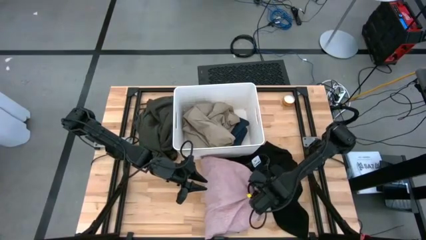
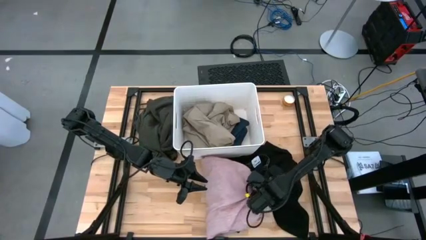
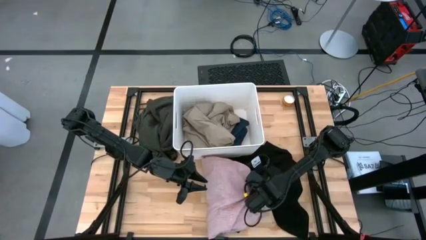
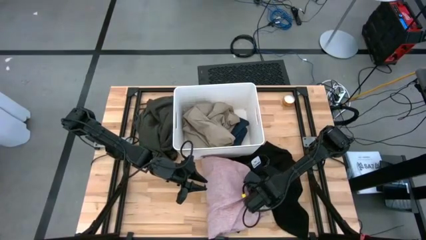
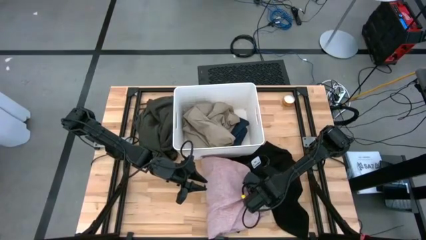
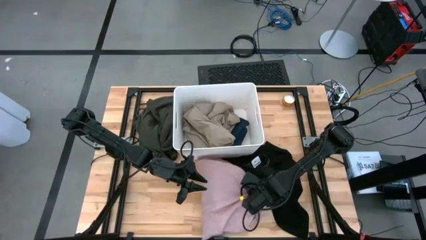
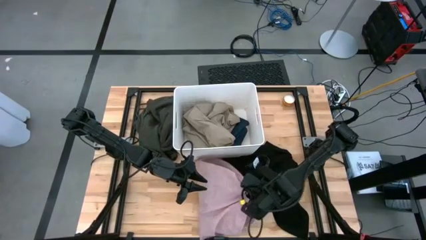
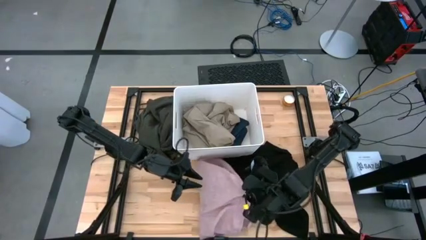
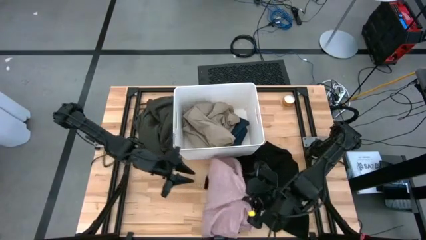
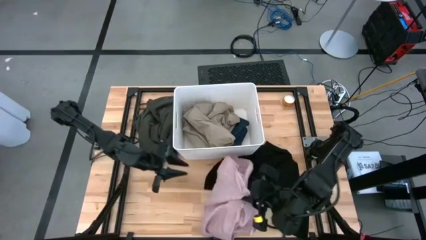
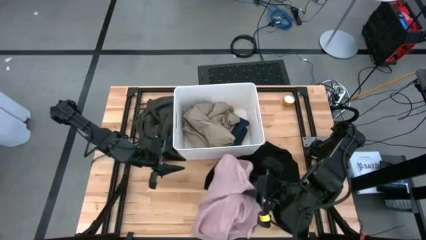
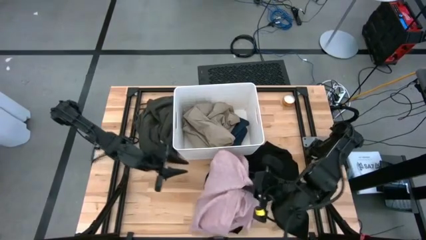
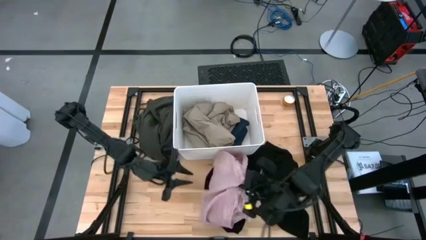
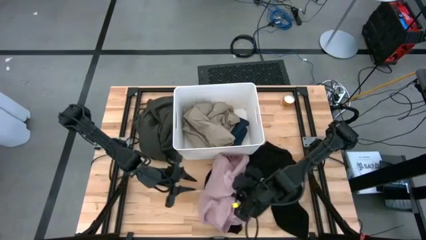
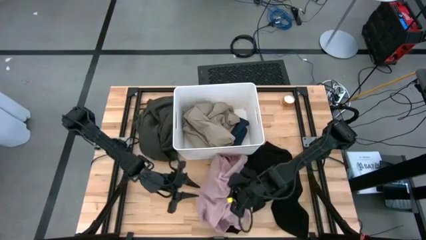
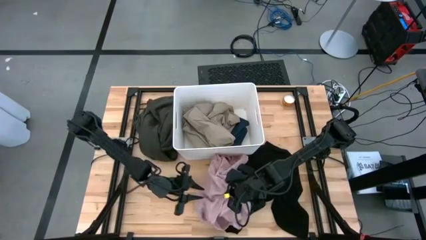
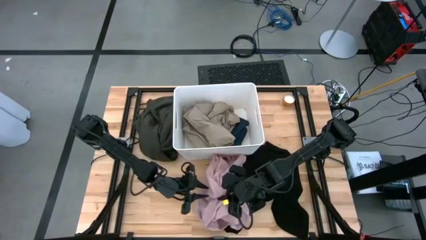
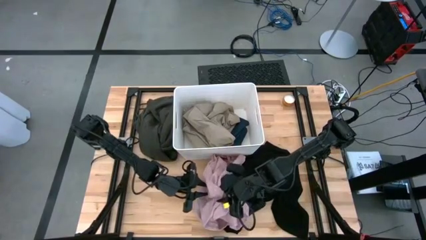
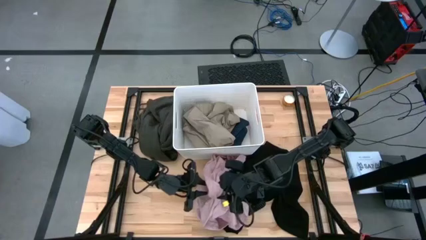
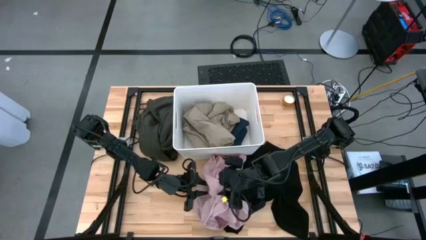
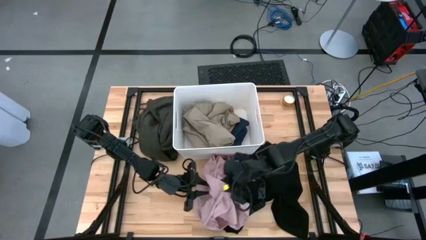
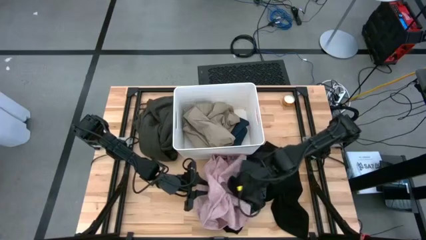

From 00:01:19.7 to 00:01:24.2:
Task: Sort clothes
Put the pink shirt into the laundry organizer bin

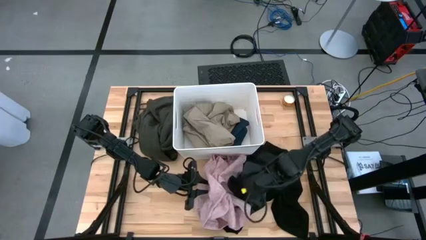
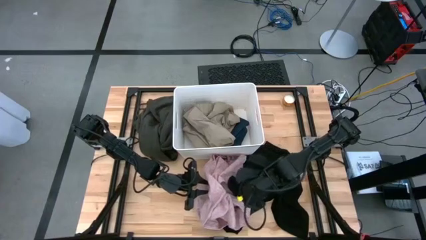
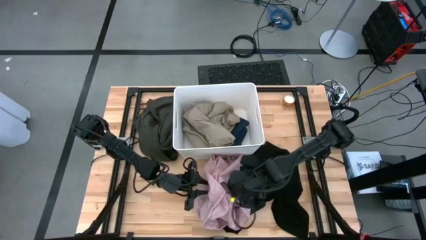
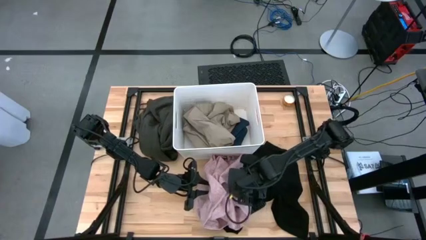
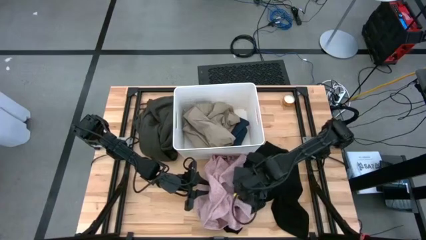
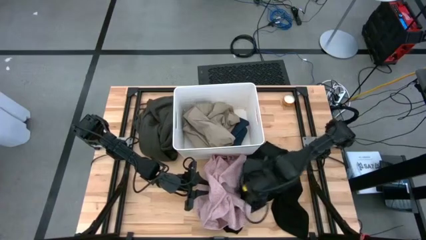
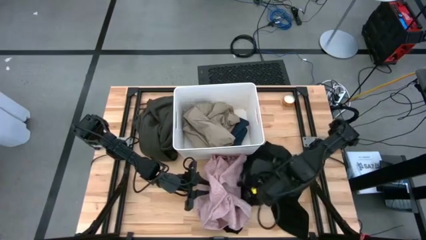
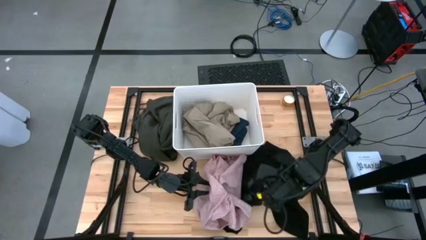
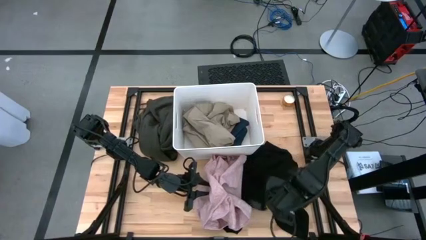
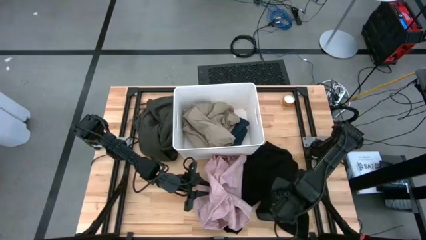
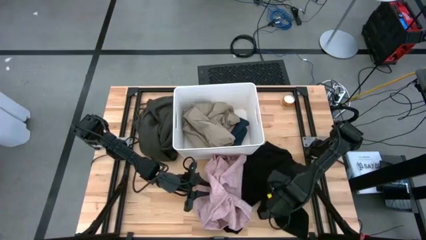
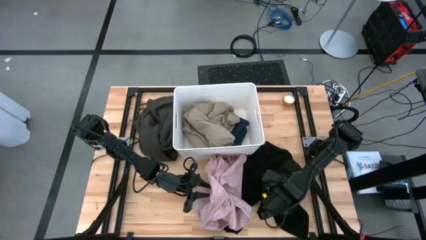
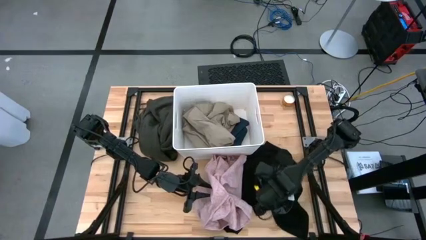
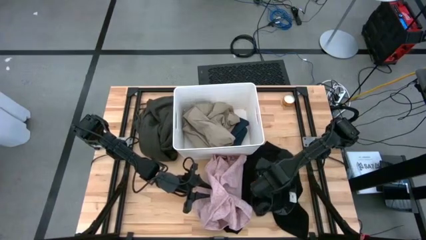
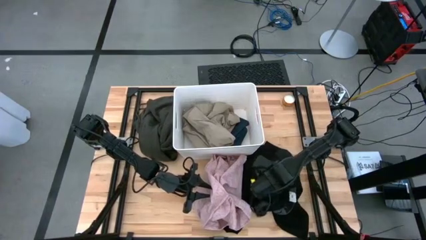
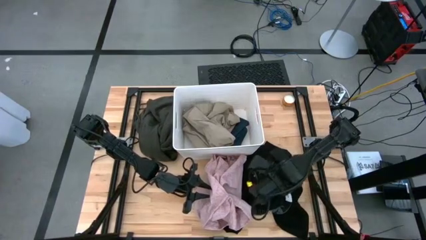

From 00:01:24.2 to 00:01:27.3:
Move the black underwear to the right of the table

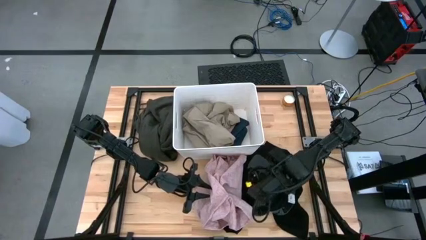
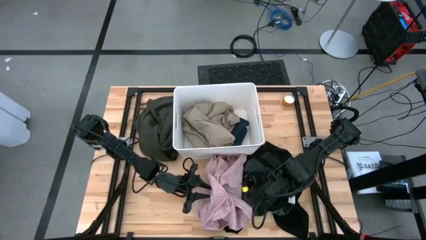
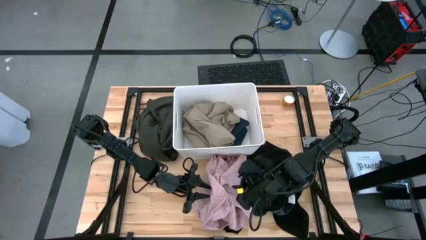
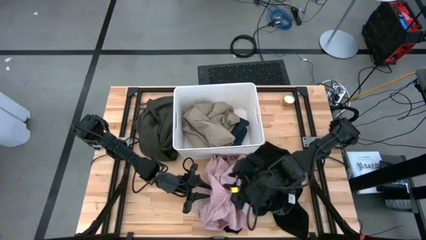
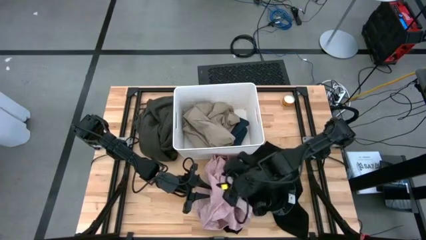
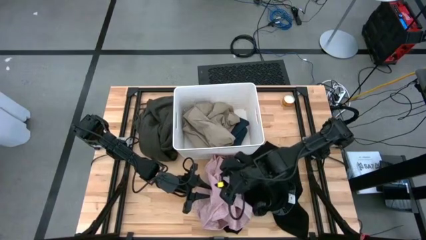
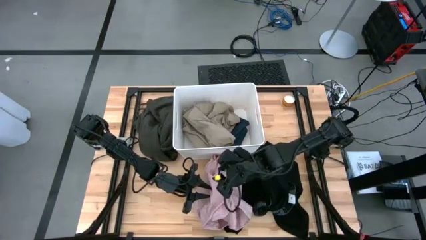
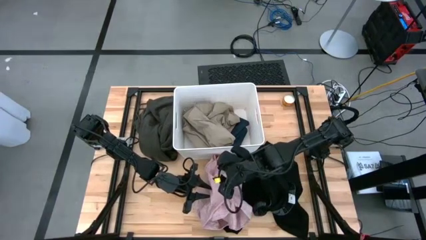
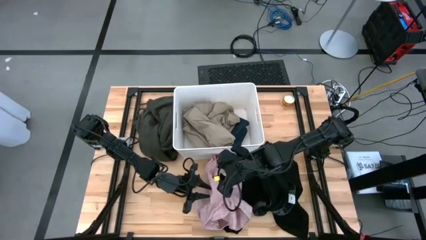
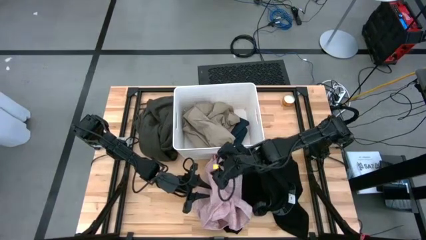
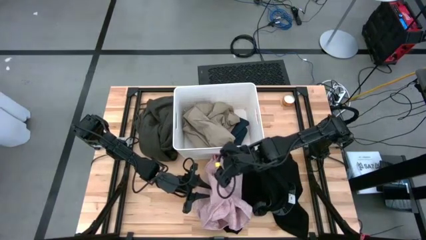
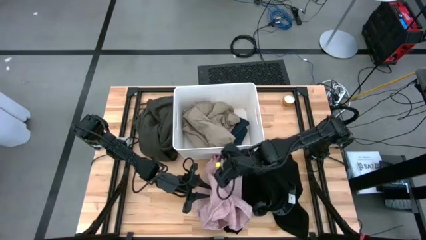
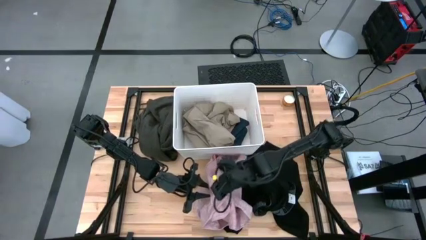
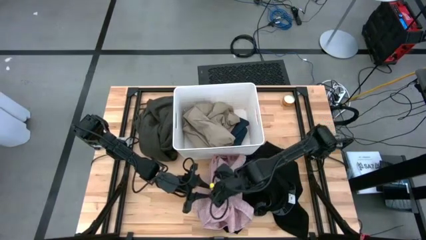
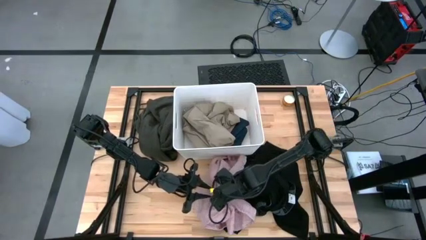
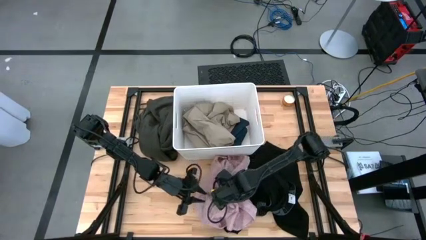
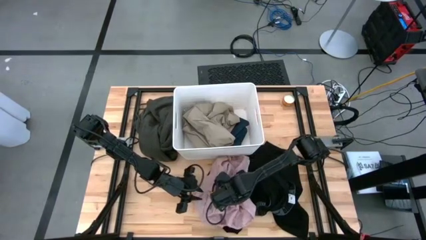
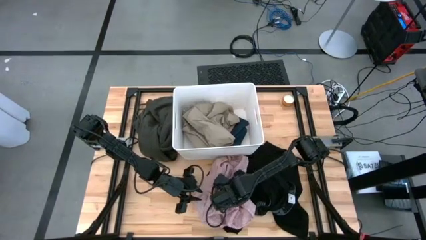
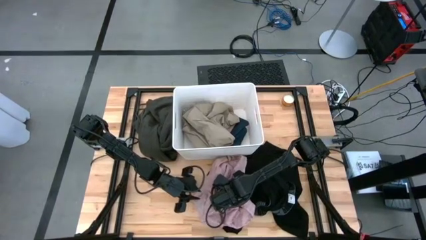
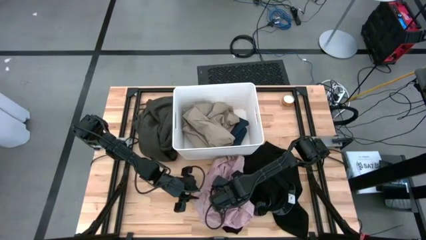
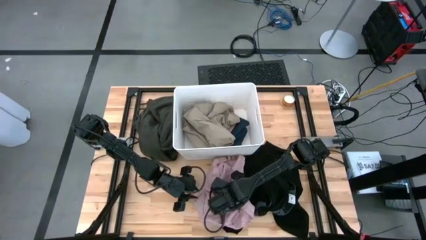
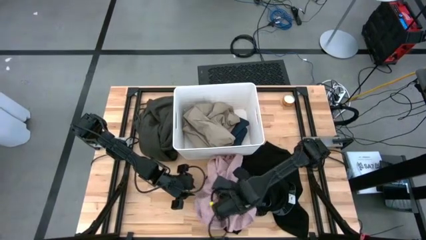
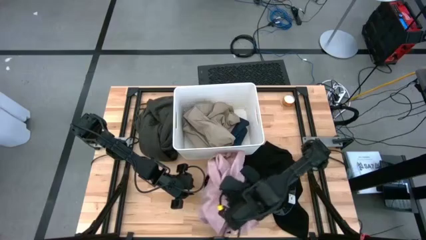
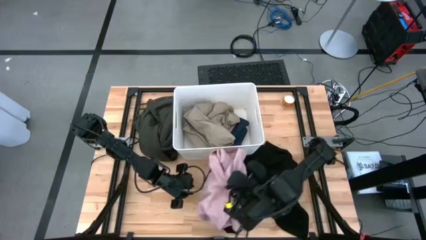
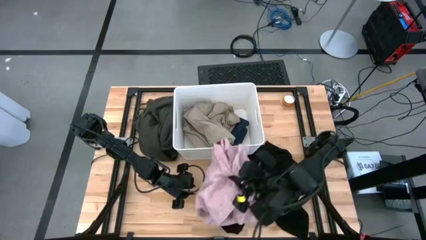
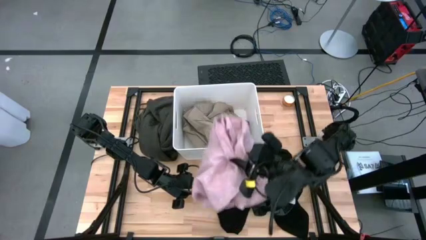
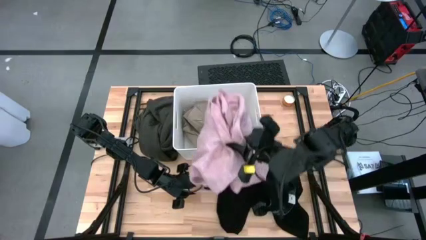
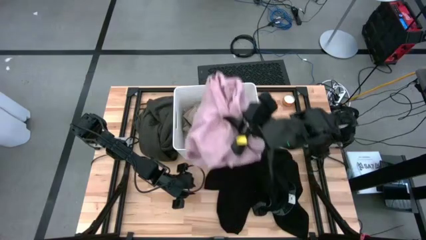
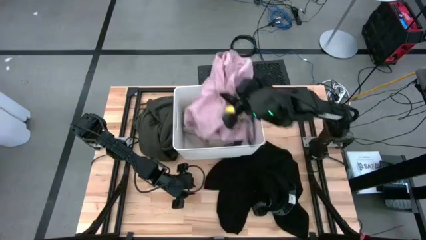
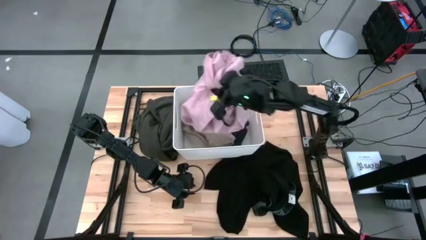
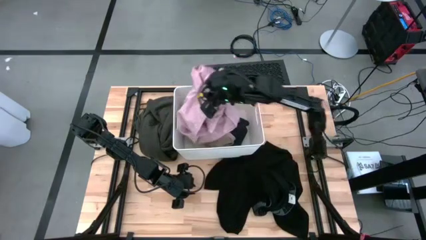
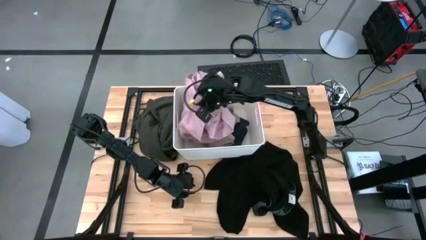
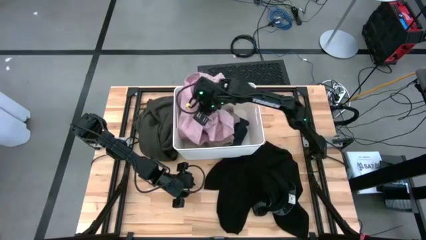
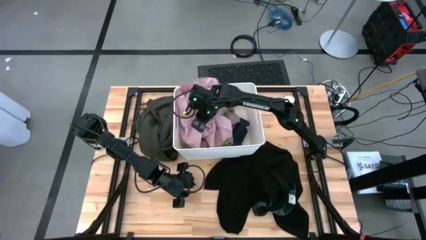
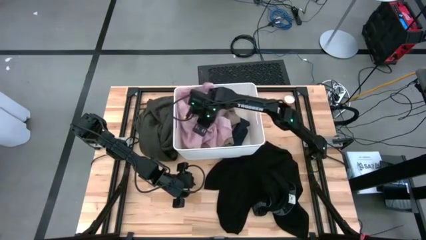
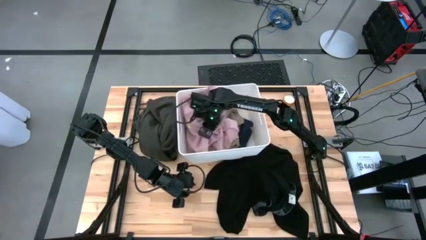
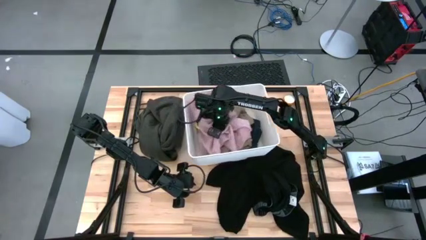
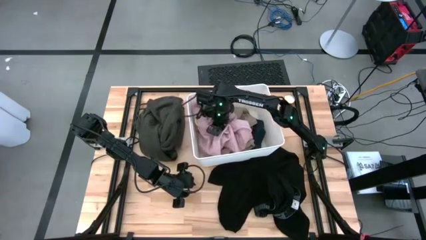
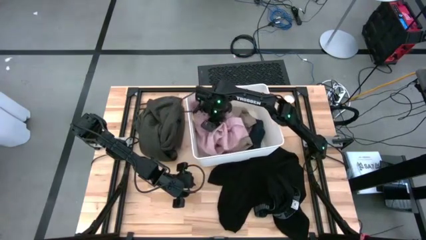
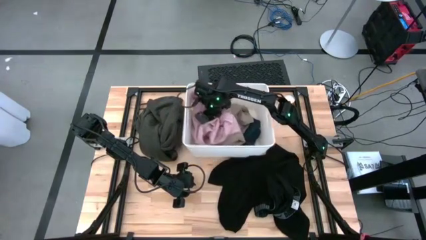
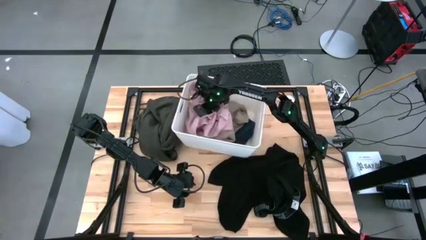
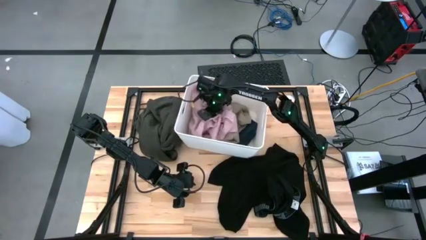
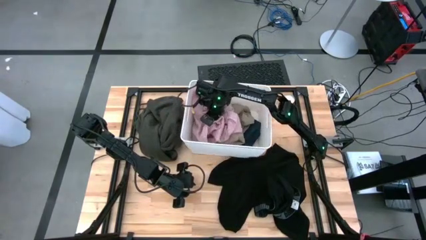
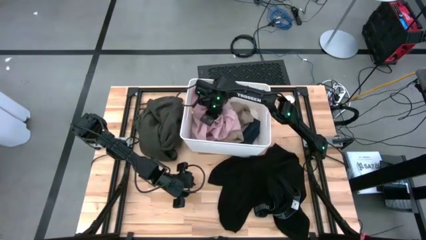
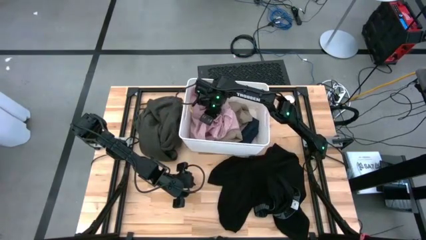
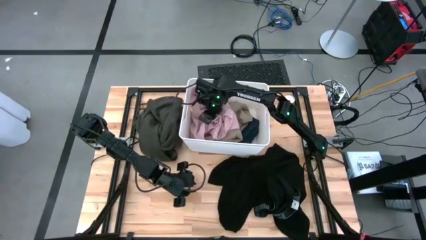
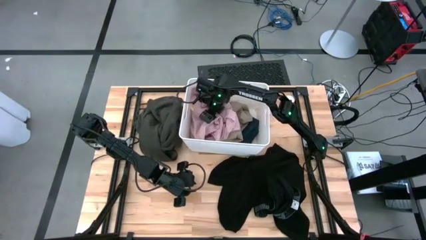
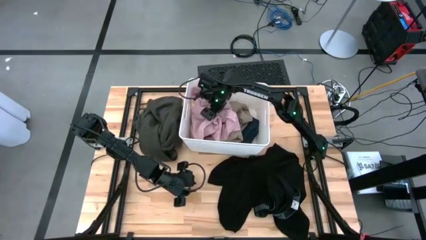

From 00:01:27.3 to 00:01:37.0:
Put the pink shirt into the laundry organizer bin
